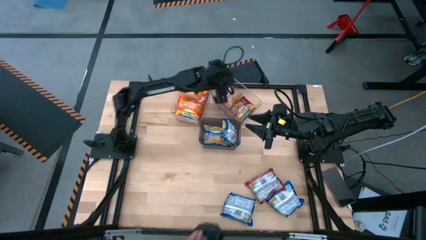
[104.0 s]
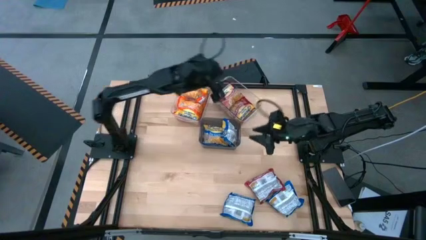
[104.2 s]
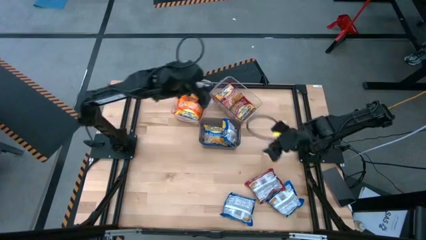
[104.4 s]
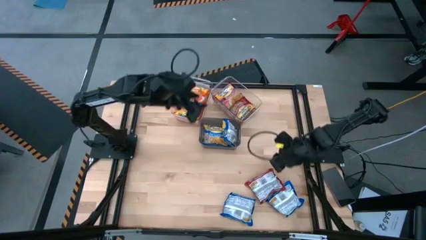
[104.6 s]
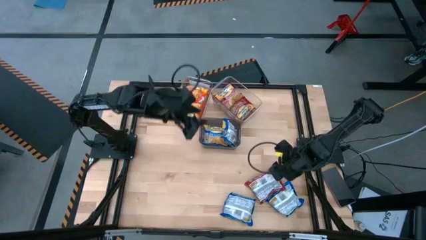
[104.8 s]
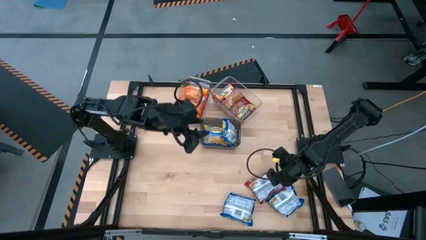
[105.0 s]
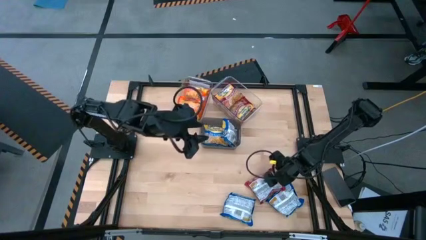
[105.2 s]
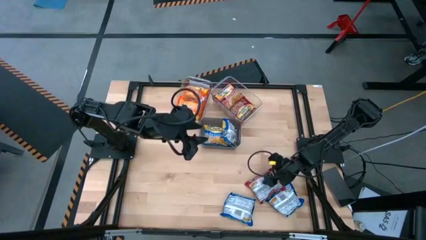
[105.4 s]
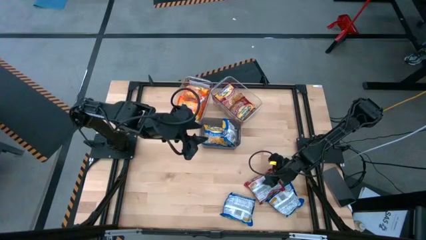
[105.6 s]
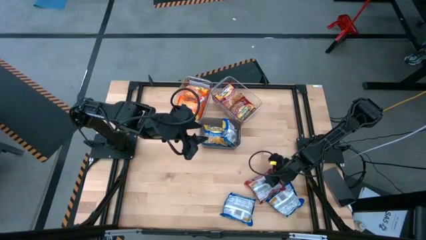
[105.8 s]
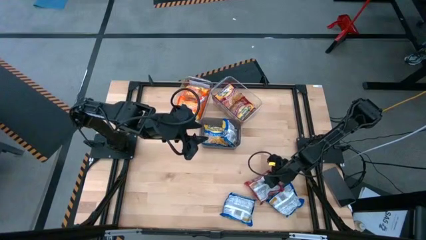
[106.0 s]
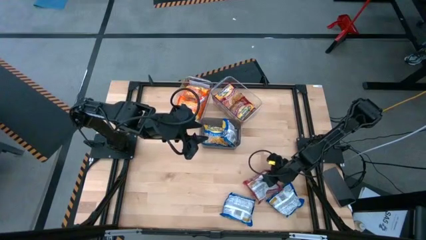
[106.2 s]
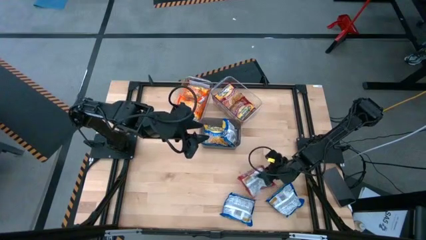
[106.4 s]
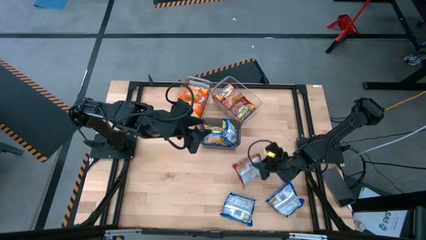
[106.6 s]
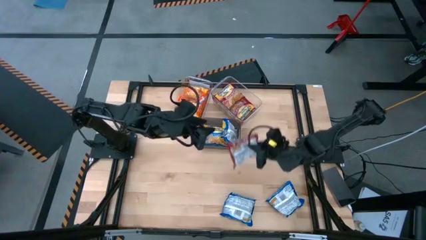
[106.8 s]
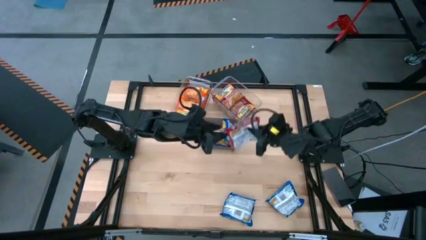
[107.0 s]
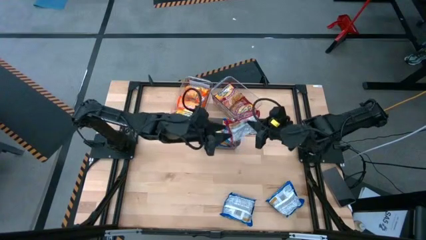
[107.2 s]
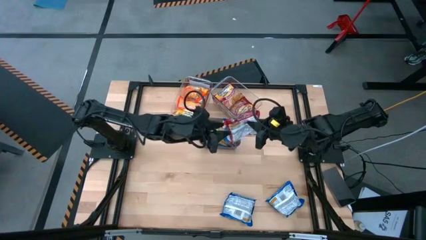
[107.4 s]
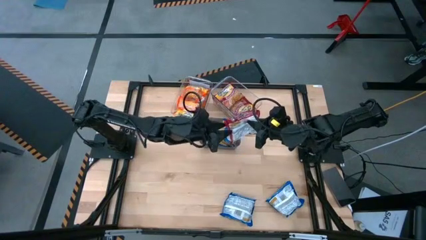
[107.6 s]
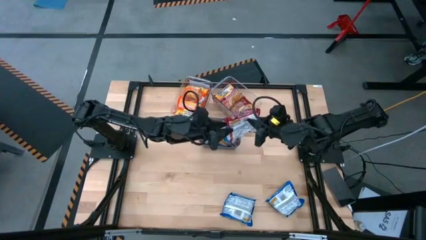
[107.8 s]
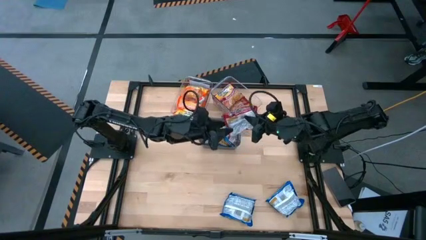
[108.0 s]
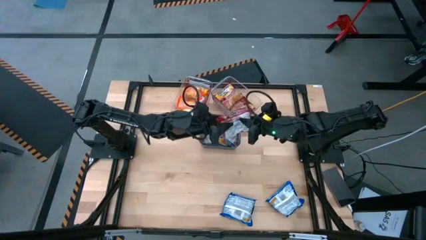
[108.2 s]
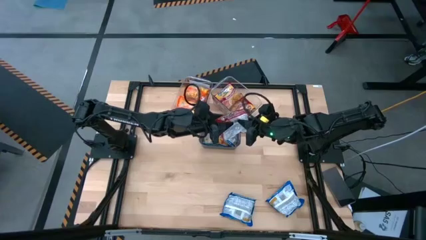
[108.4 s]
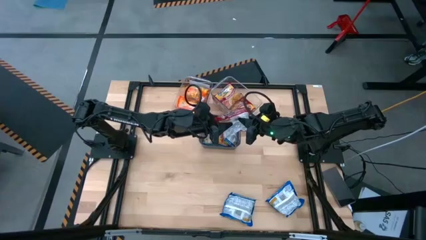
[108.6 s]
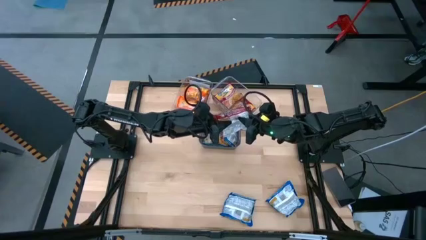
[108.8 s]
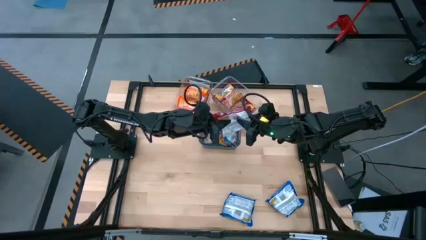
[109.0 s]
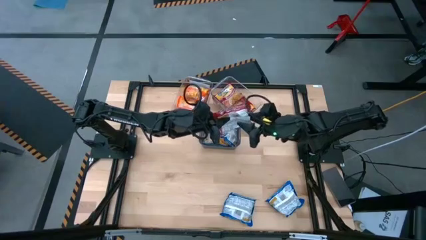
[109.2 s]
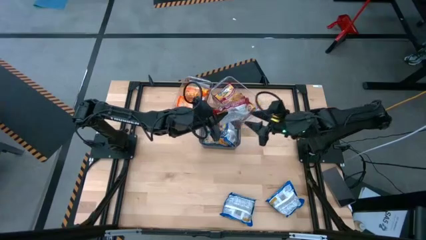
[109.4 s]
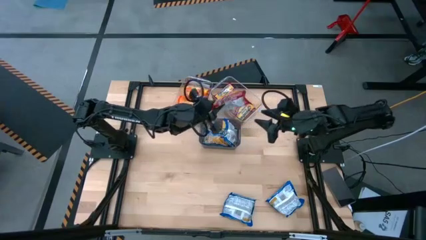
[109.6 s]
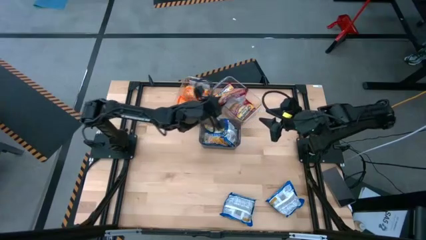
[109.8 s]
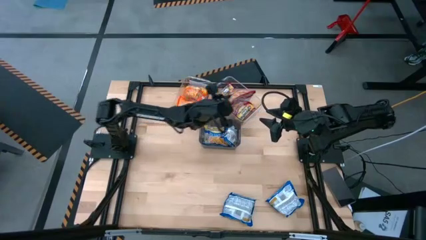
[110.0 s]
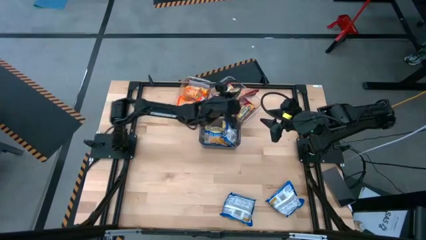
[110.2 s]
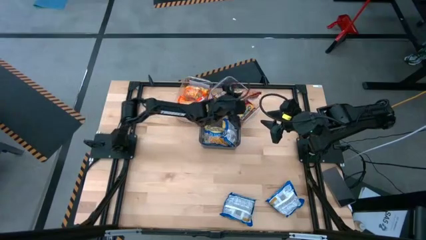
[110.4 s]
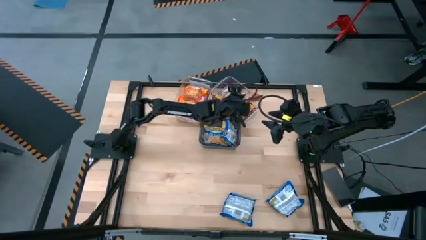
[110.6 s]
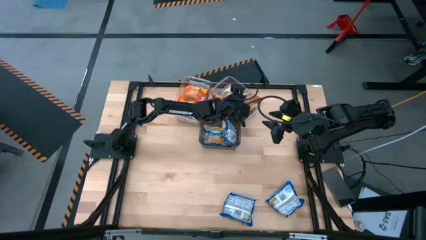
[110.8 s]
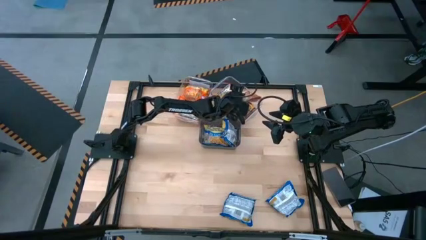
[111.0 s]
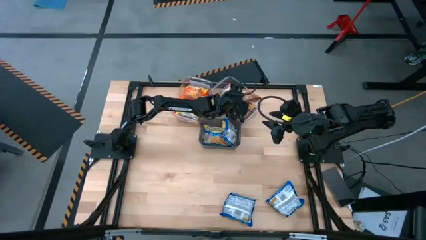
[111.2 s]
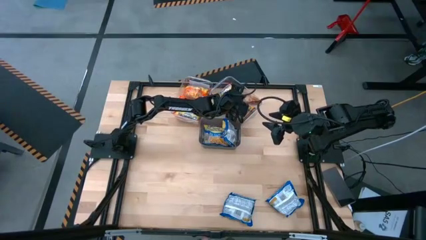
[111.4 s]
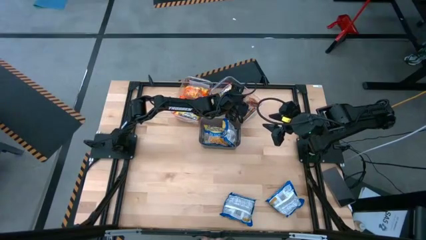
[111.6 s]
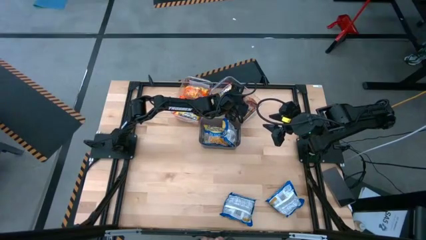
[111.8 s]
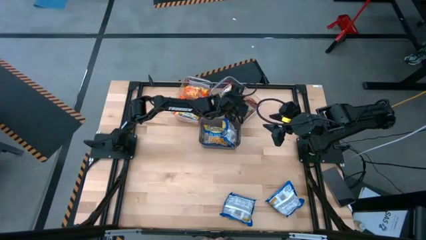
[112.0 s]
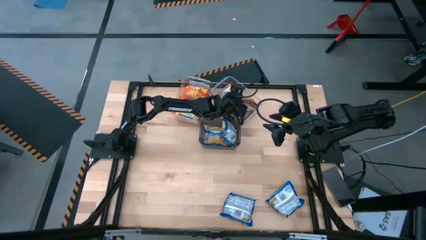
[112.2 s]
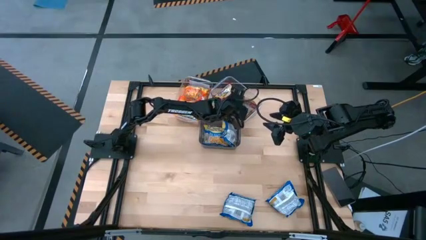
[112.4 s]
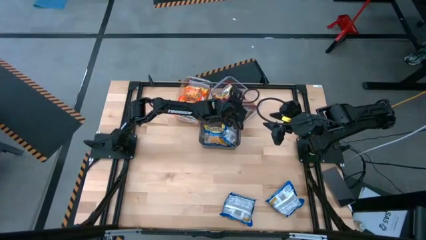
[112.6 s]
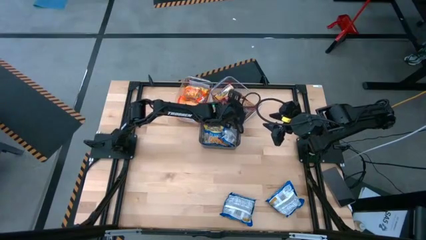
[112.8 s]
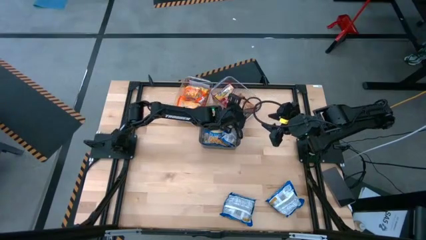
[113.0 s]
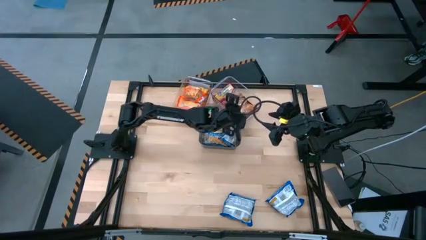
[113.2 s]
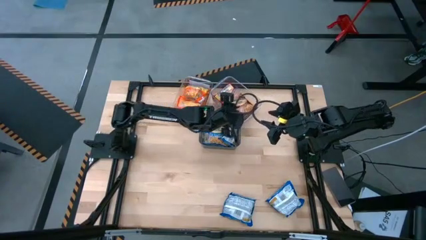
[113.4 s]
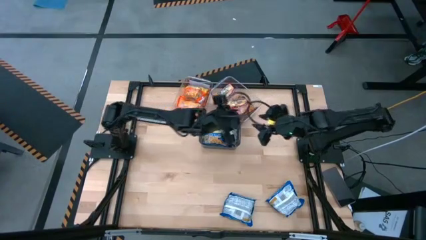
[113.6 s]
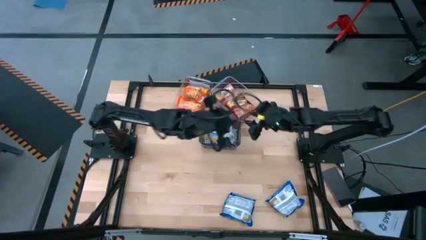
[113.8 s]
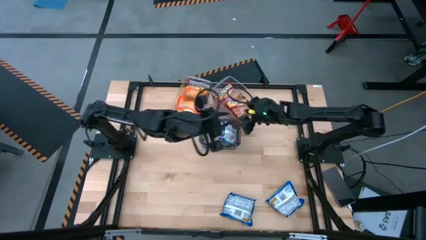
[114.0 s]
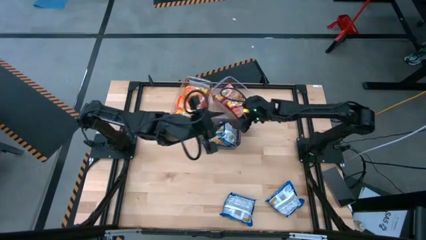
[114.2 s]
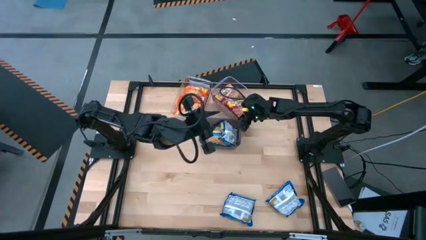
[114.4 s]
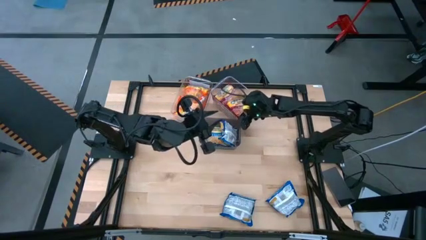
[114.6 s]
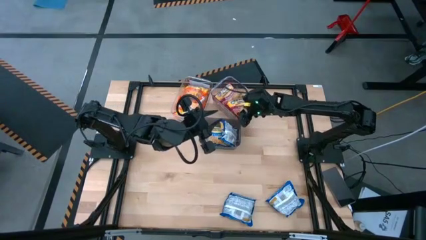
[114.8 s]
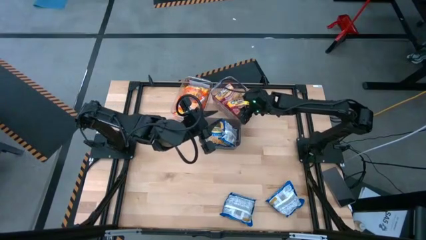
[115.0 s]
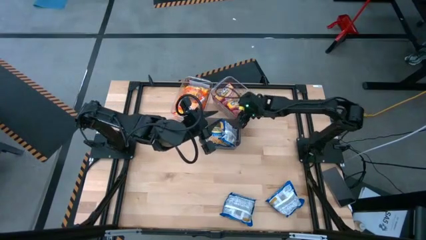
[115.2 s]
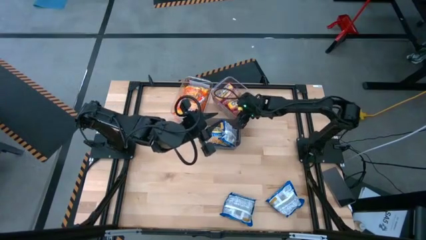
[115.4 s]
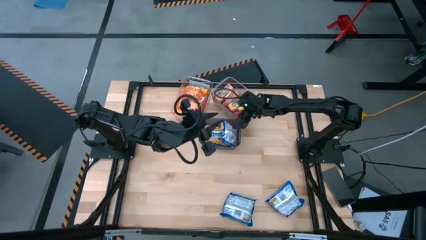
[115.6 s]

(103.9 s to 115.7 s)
Task: Sort Maruchan noodles
Put the red noodle pack into the right transparent bin
